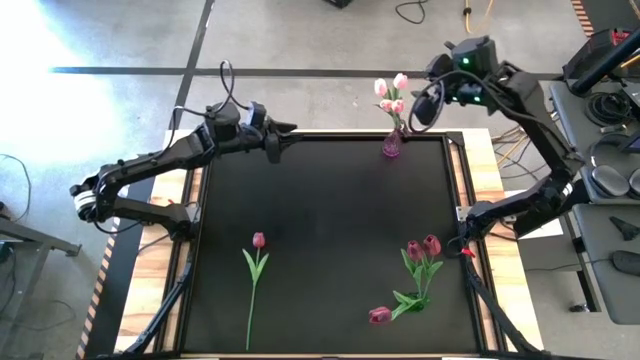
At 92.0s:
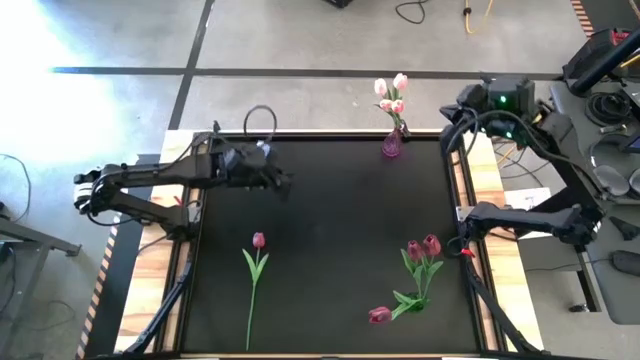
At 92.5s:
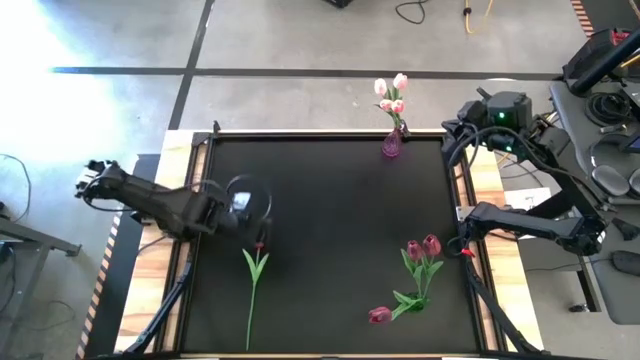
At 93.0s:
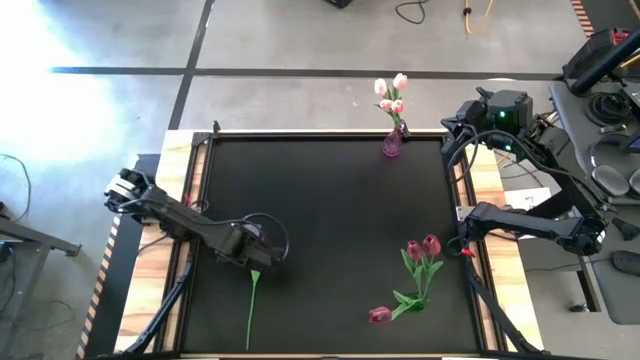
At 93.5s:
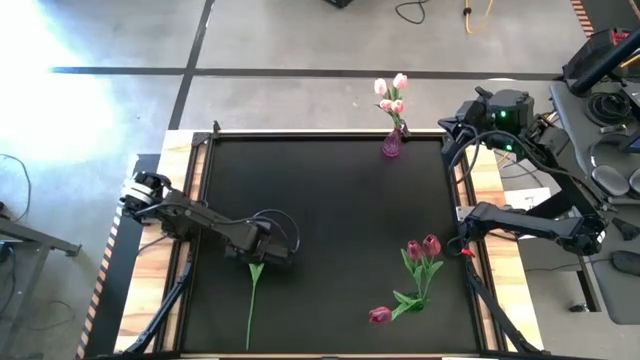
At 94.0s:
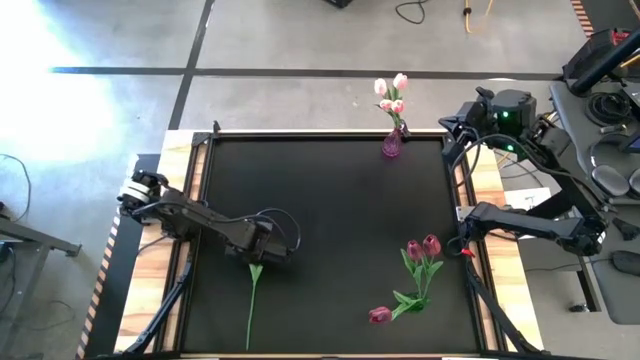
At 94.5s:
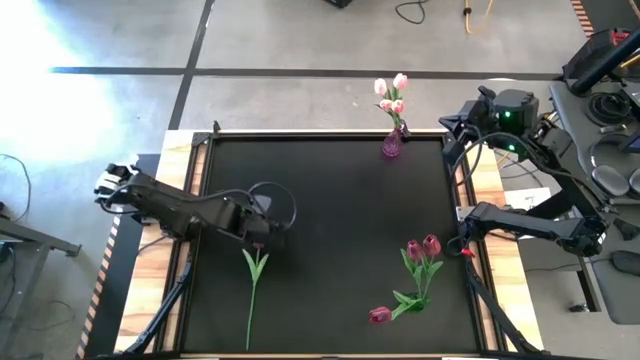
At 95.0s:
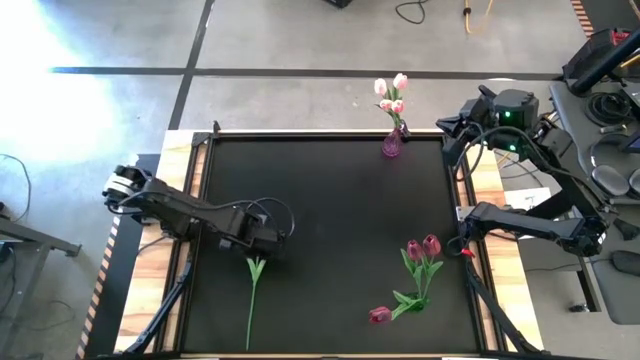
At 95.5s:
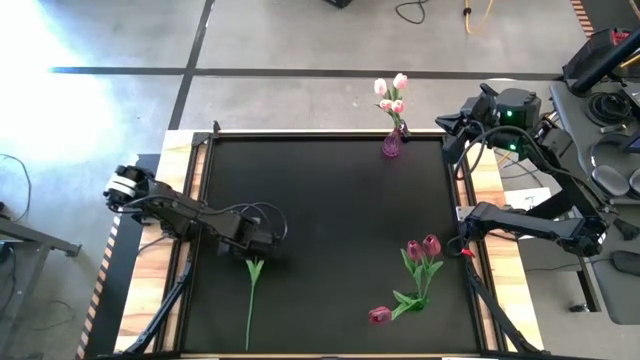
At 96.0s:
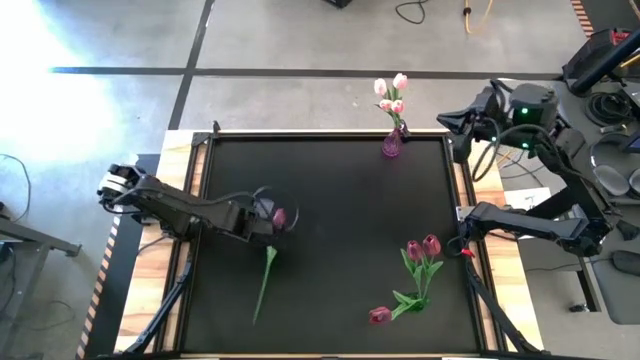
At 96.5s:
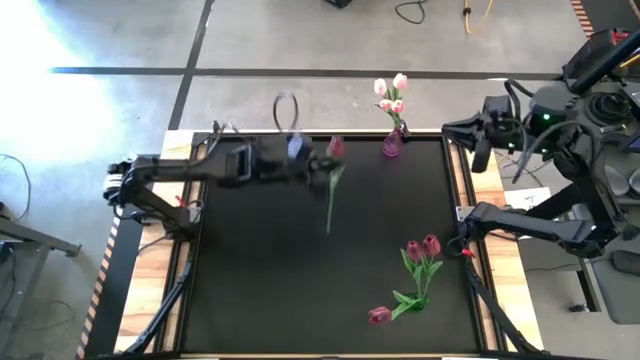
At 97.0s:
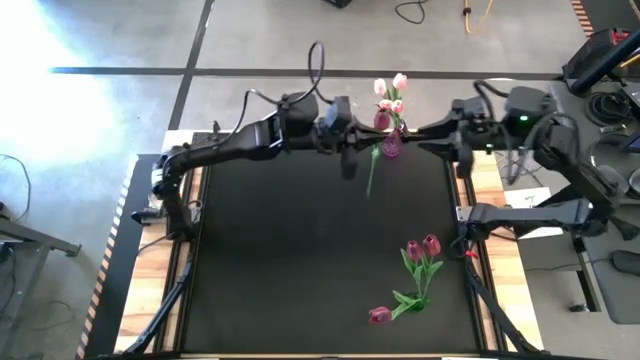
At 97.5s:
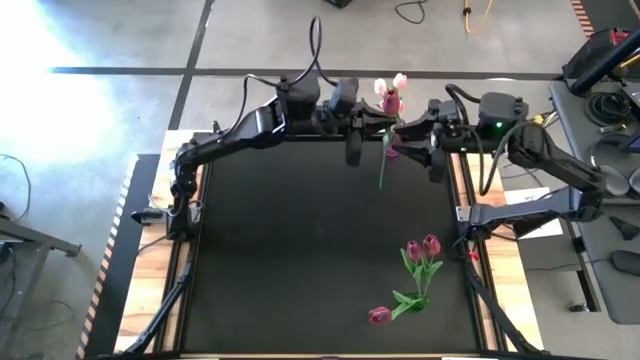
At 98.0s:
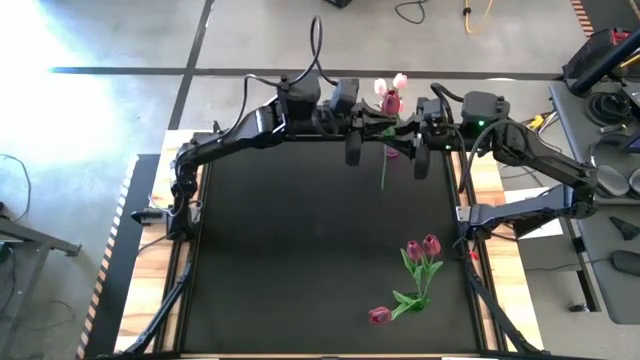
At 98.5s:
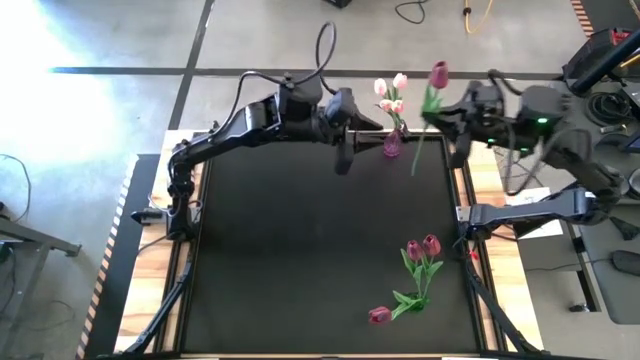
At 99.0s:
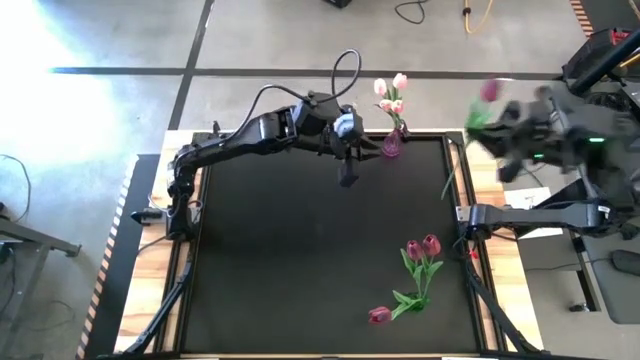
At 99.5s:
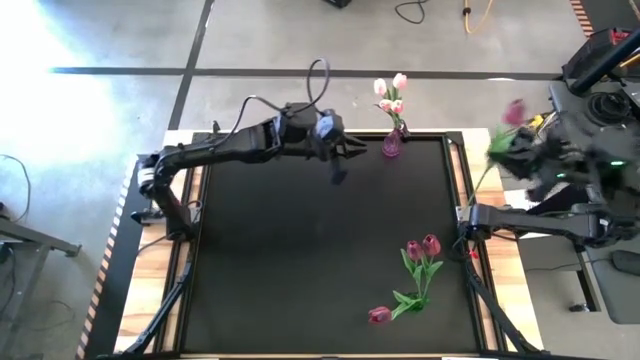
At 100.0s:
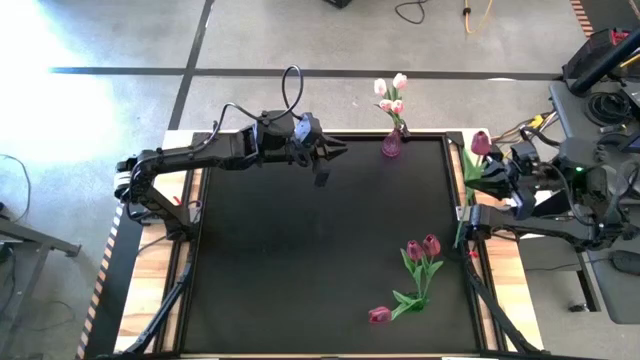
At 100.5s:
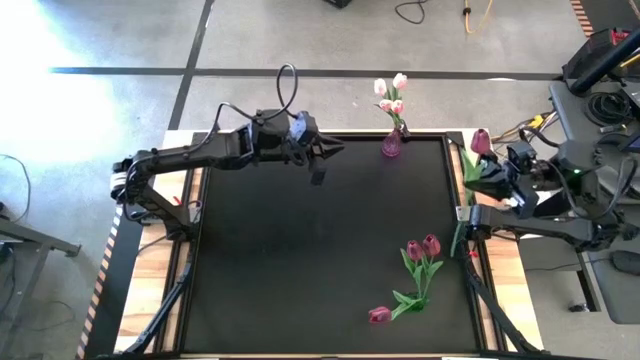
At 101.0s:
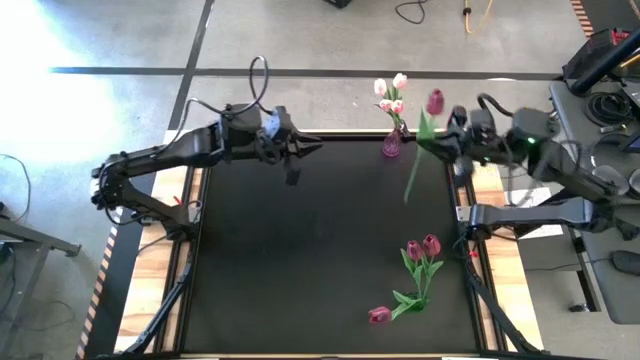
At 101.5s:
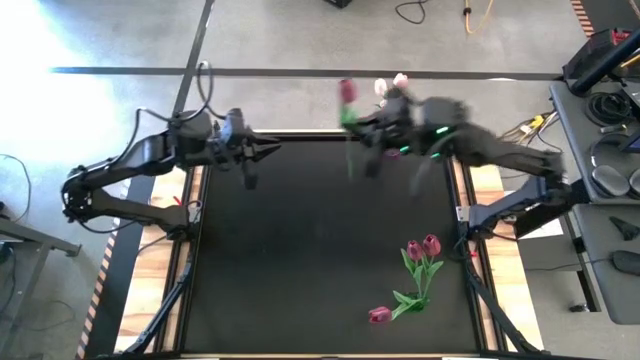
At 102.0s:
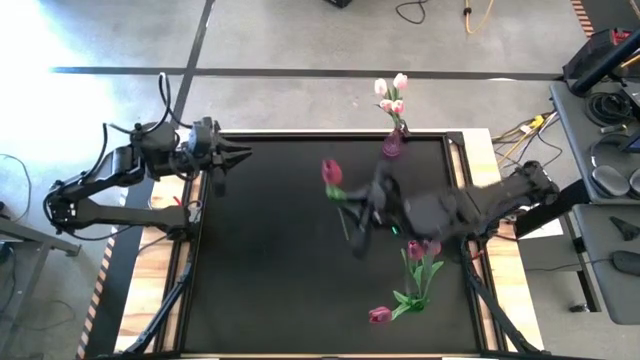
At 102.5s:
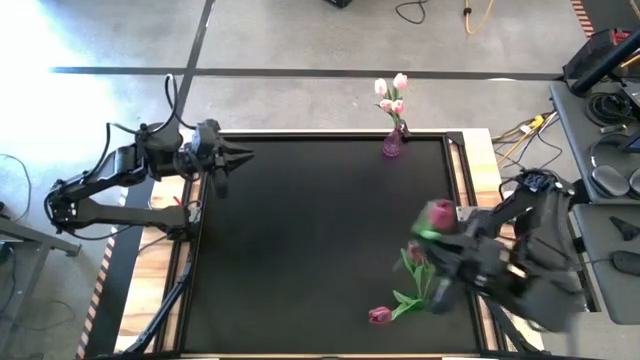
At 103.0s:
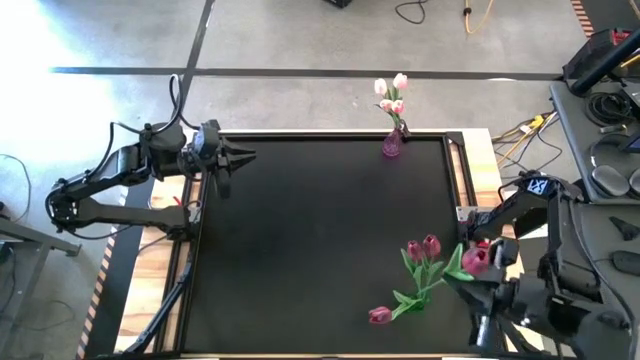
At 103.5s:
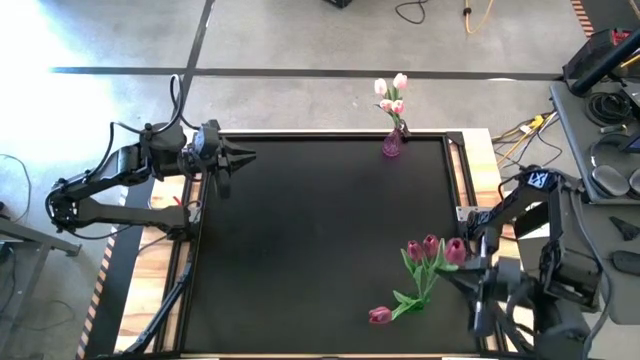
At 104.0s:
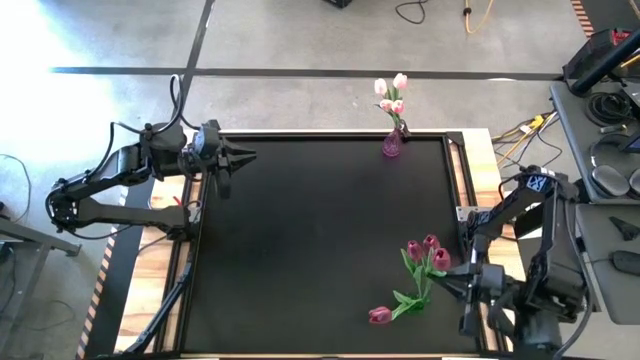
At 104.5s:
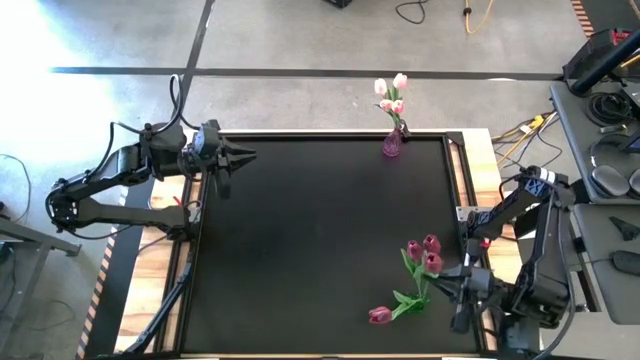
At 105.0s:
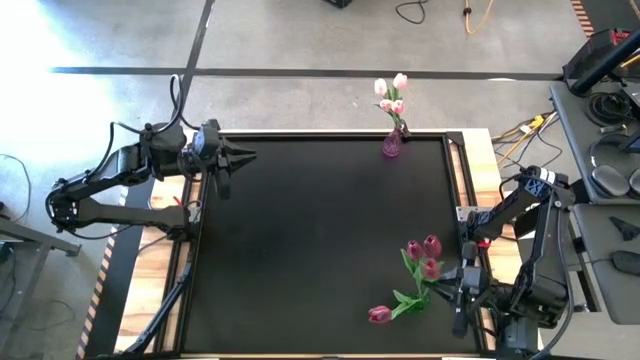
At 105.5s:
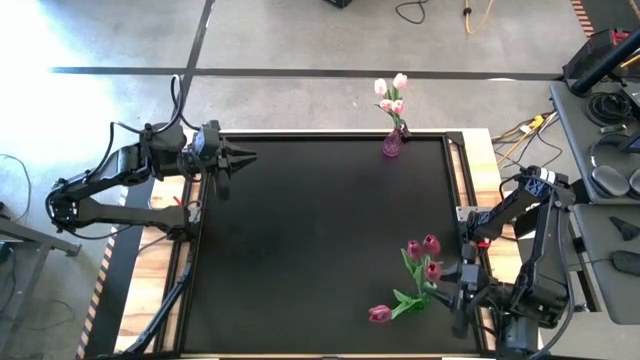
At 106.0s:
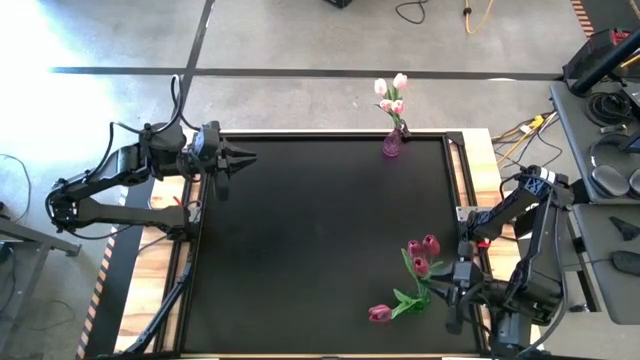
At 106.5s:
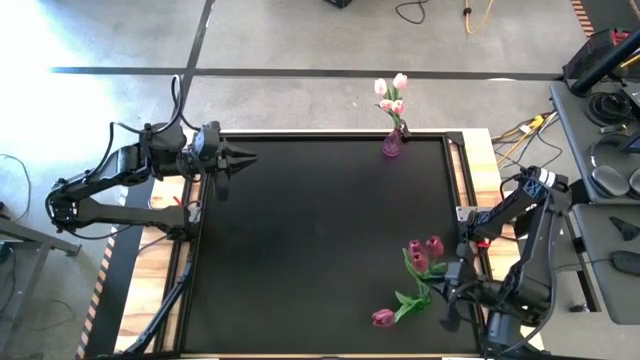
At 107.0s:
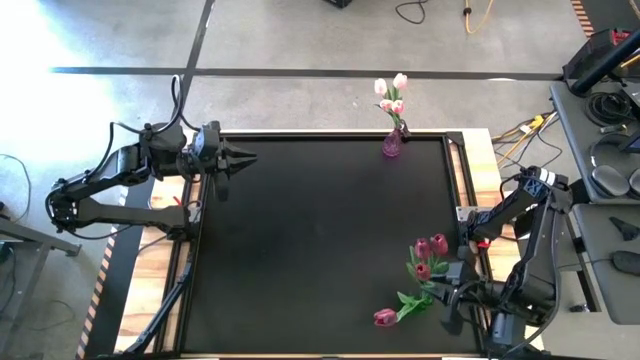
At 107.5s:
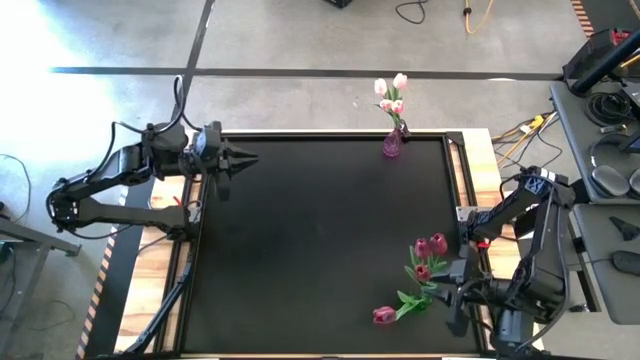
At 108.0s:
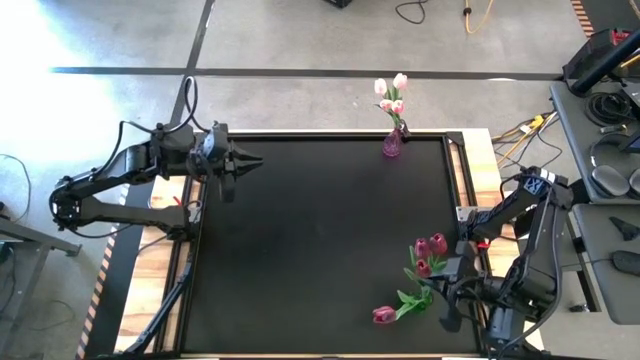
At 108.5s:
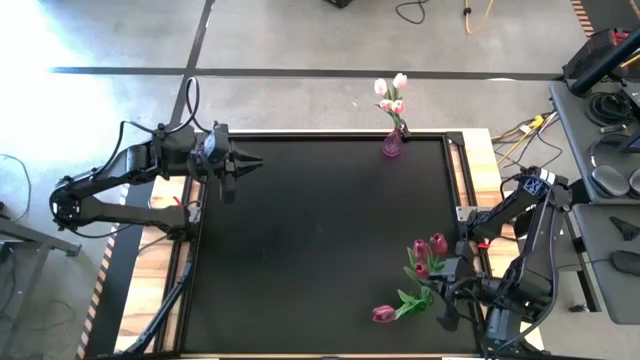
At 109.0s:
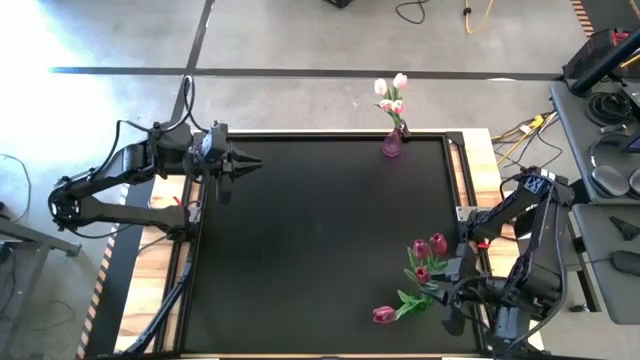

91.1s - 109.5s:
Task: Sort flowers into vase by color
Put the red tulip into the transparent green vase

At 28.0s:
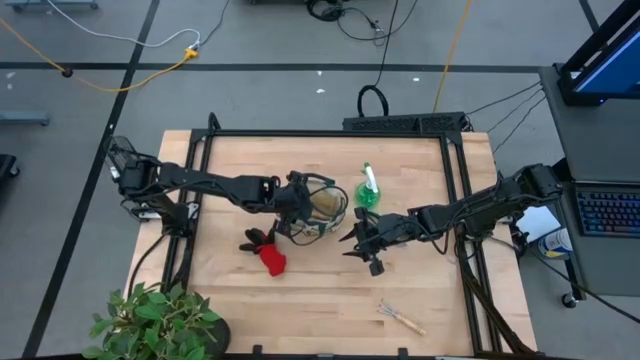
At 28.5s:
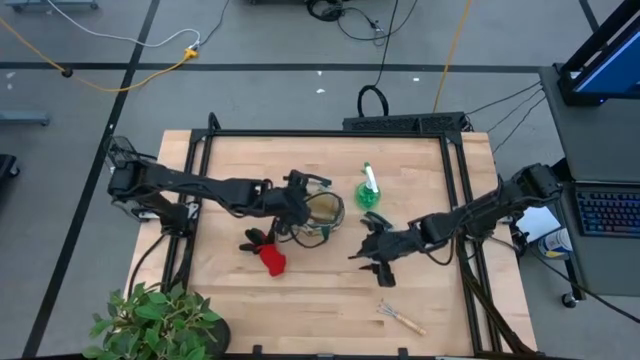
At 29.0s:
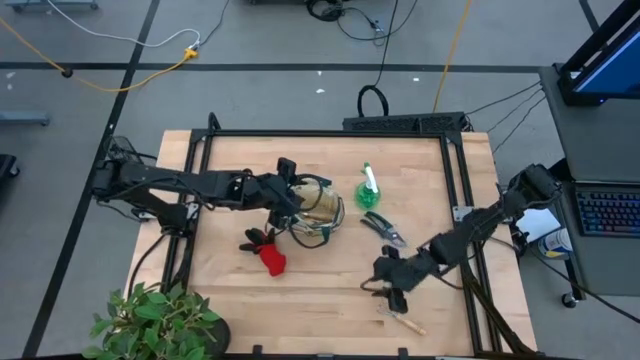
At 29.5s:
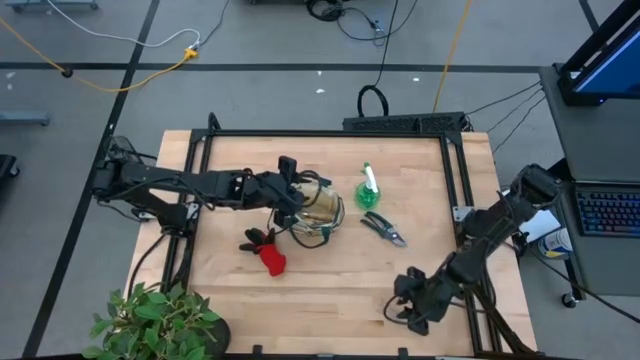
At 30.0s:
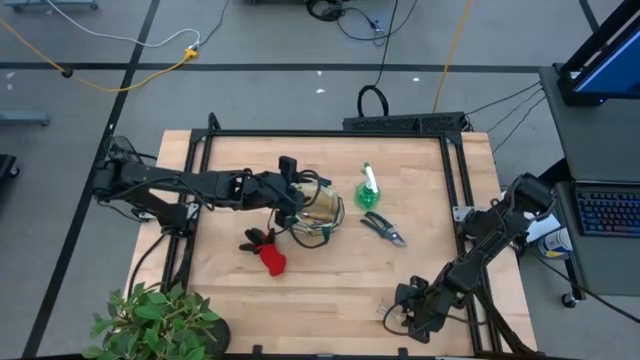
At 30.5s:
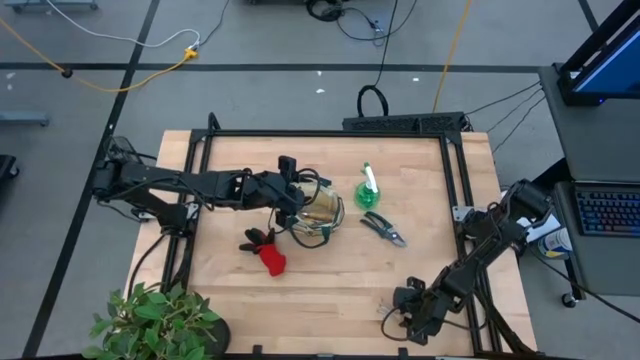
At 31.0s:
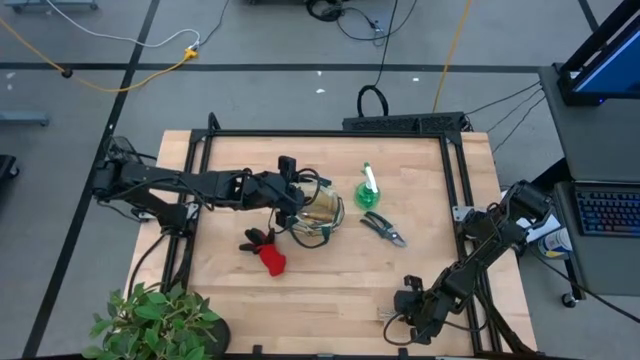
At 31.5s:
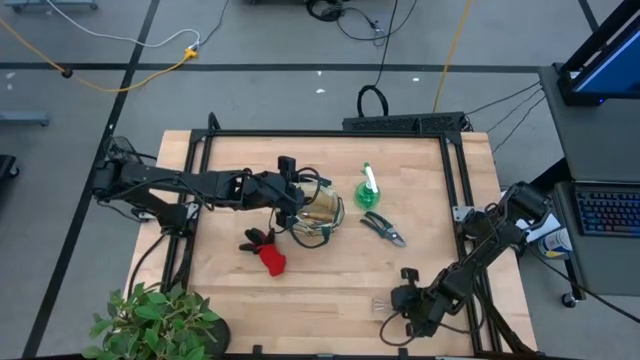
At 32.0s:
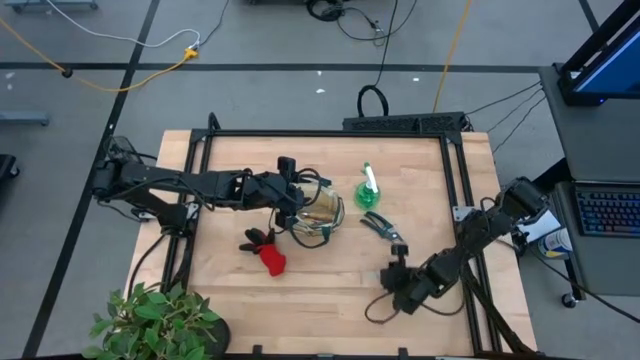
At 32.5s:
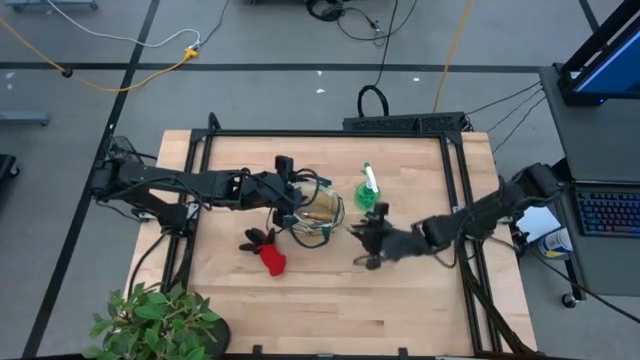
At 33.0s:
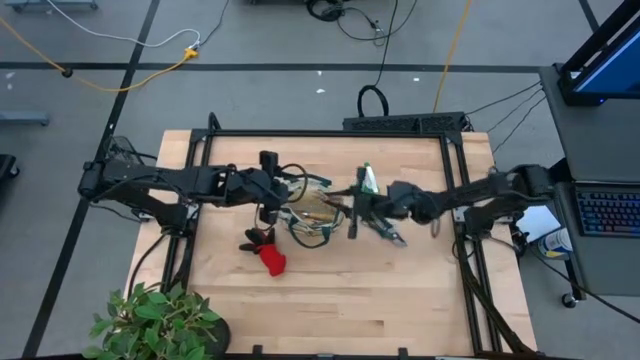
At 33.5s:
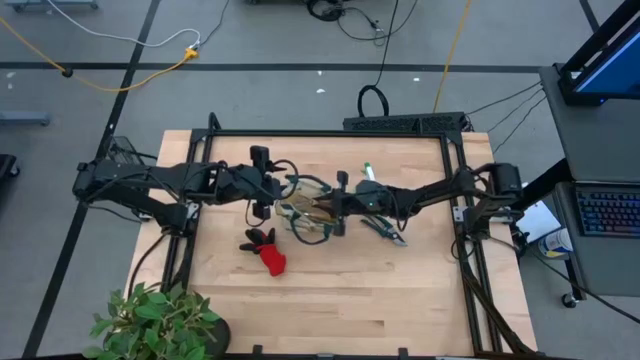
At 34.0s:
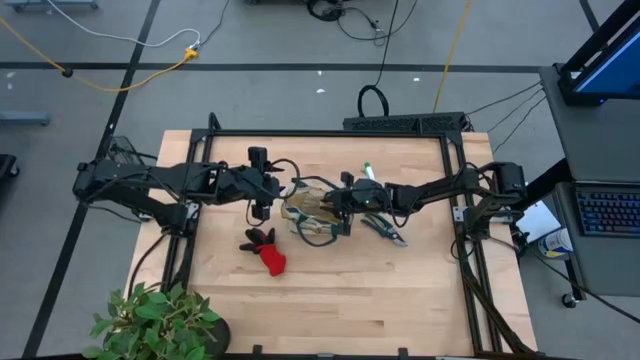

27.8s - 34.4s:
Task: Pick & Place Garden tools in Gardening bag
Put the brown hand rake into the light brown gardening bag
